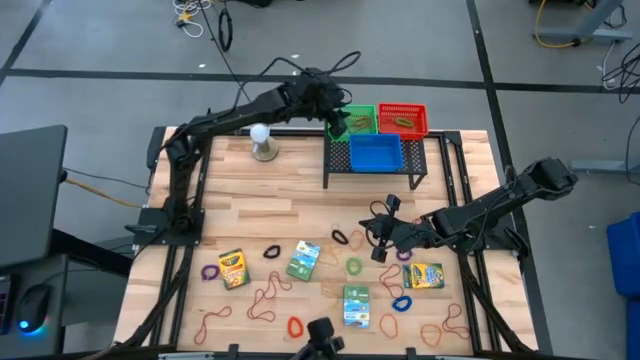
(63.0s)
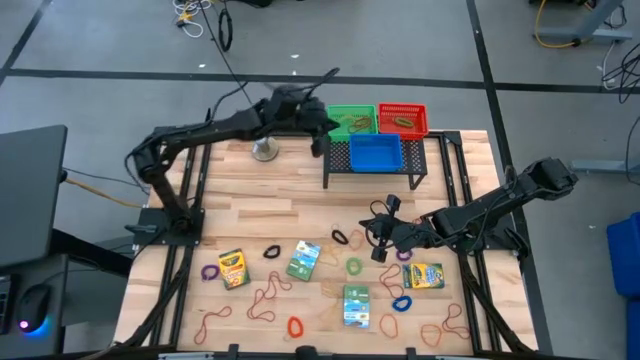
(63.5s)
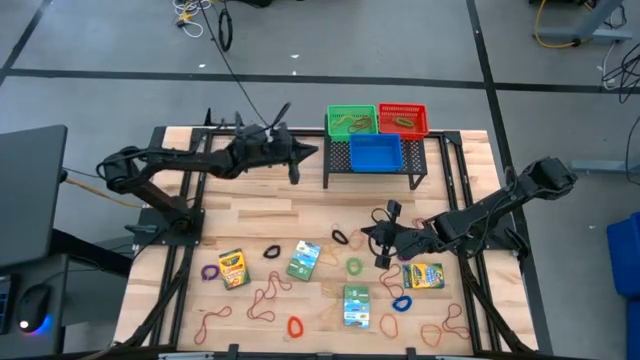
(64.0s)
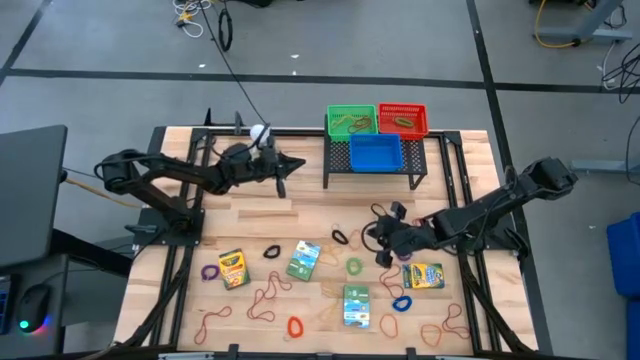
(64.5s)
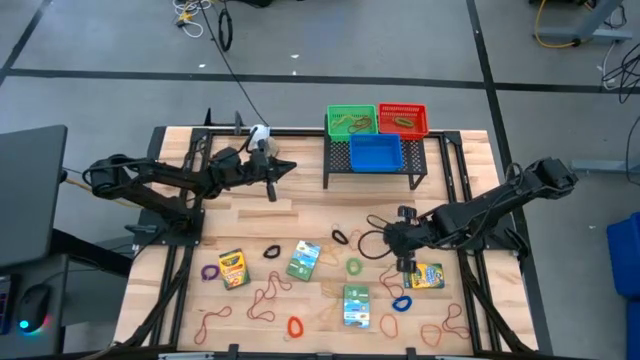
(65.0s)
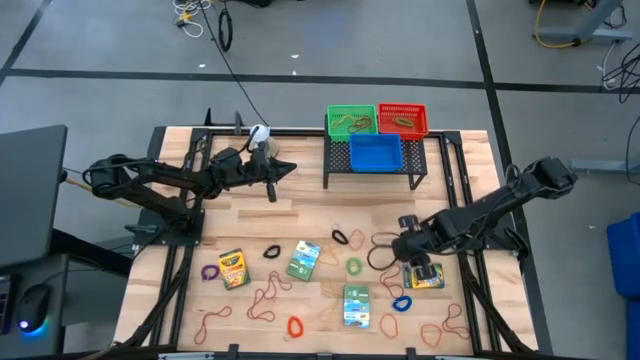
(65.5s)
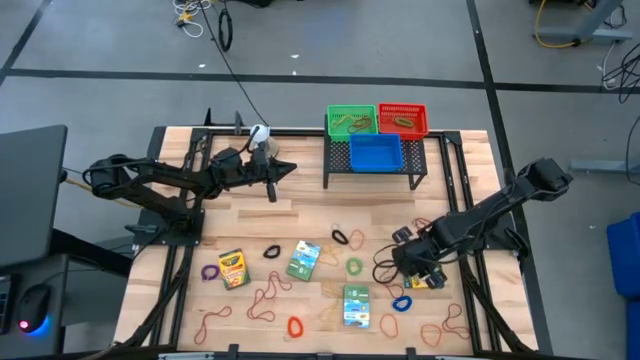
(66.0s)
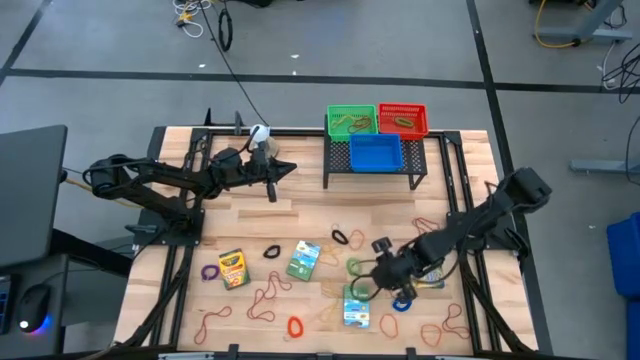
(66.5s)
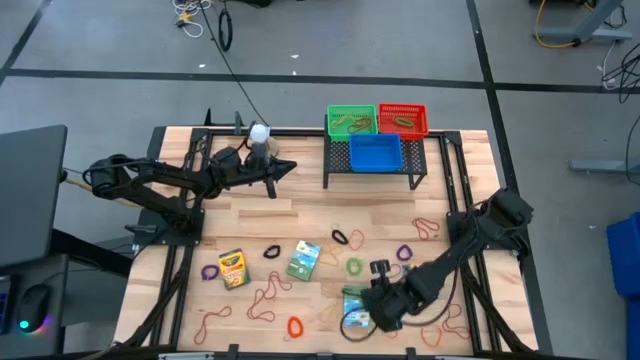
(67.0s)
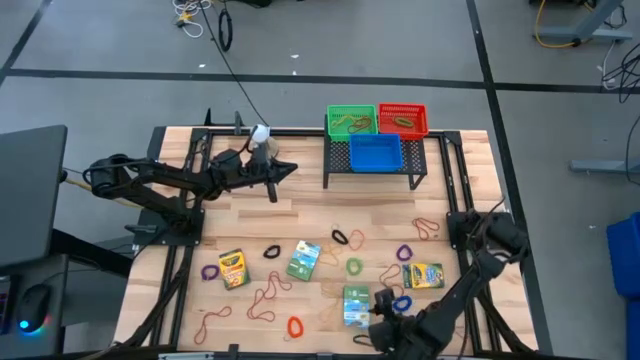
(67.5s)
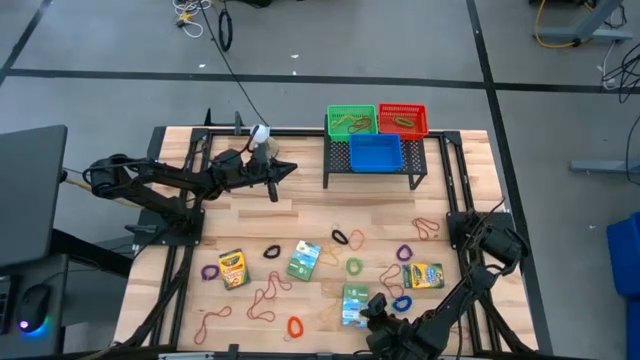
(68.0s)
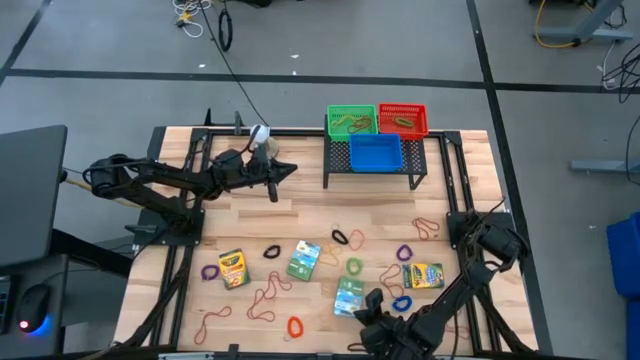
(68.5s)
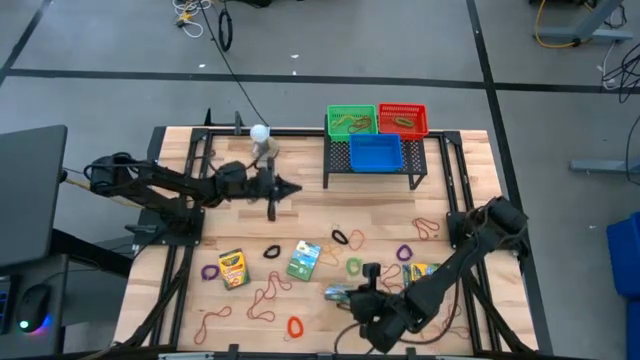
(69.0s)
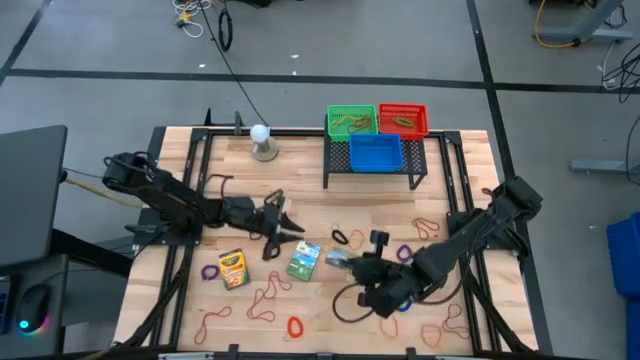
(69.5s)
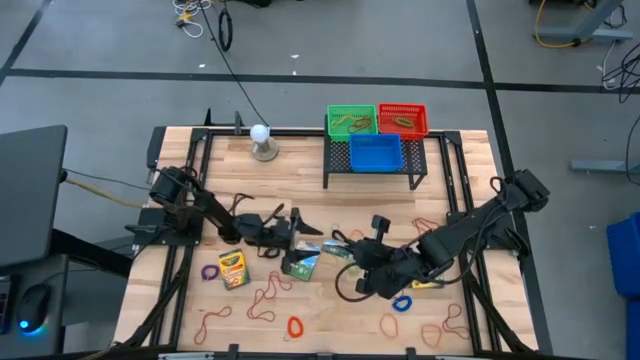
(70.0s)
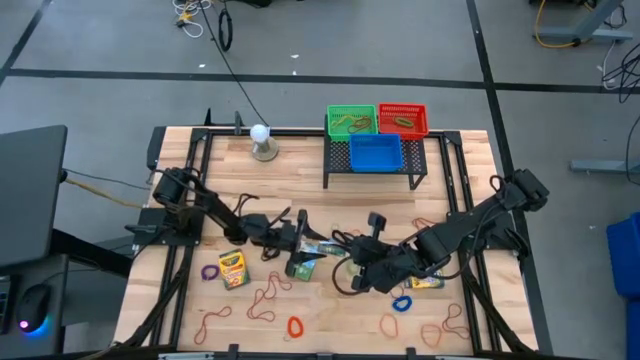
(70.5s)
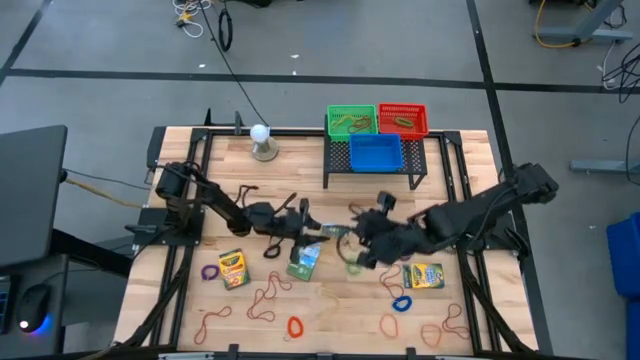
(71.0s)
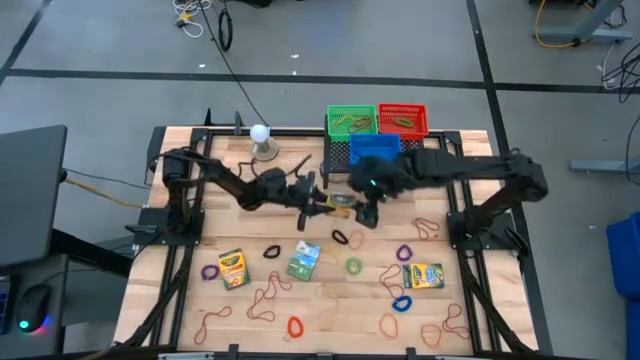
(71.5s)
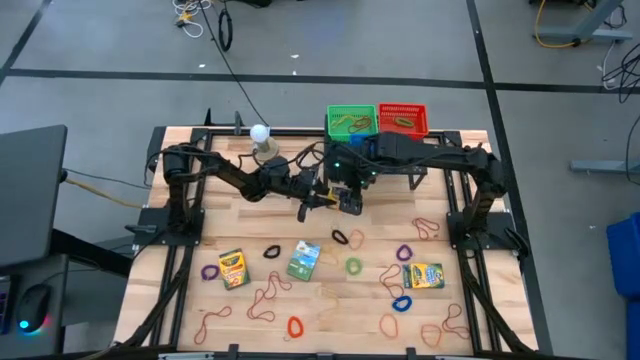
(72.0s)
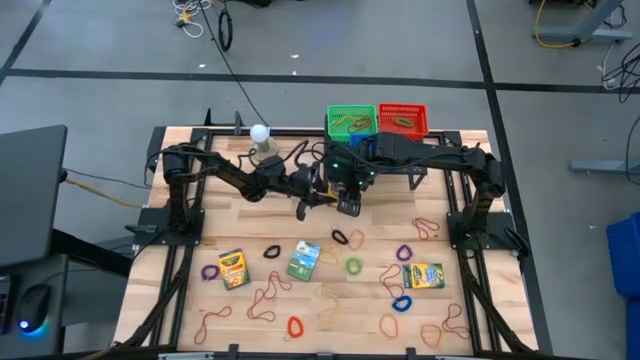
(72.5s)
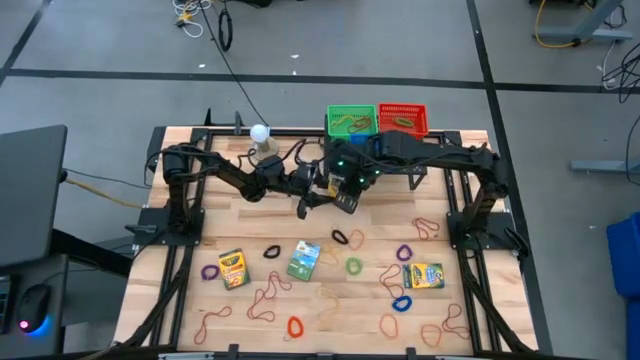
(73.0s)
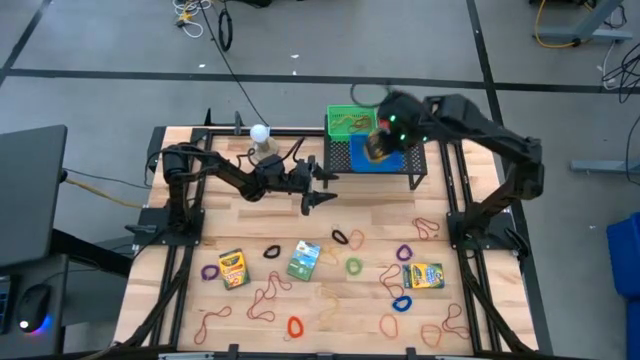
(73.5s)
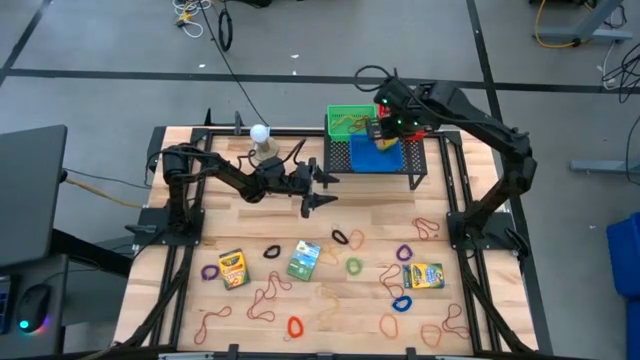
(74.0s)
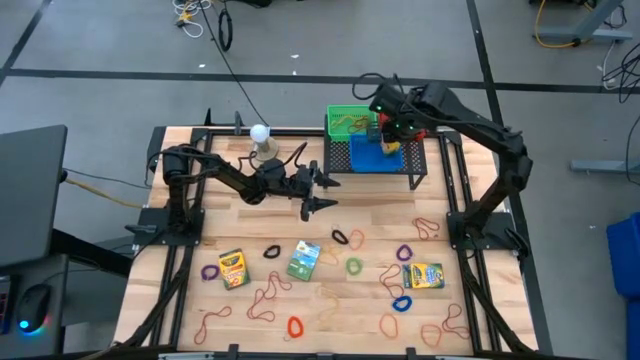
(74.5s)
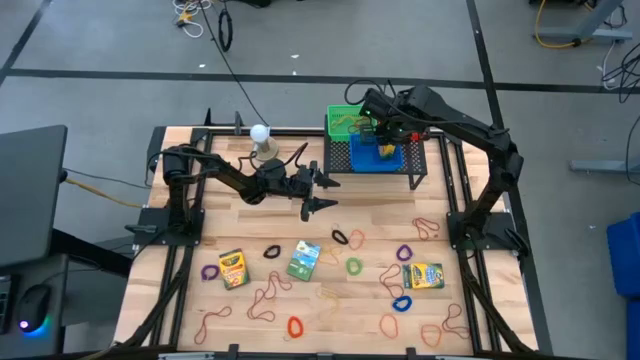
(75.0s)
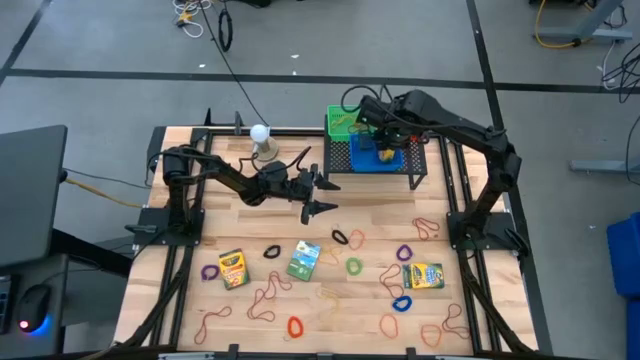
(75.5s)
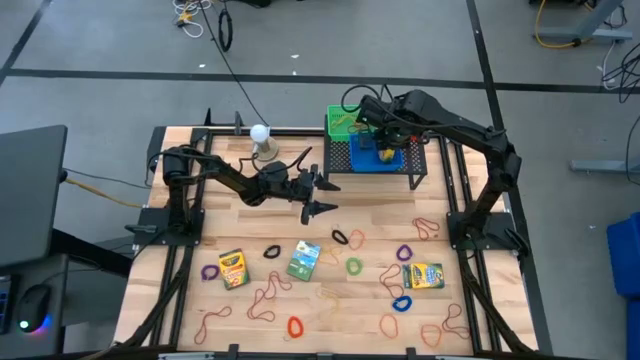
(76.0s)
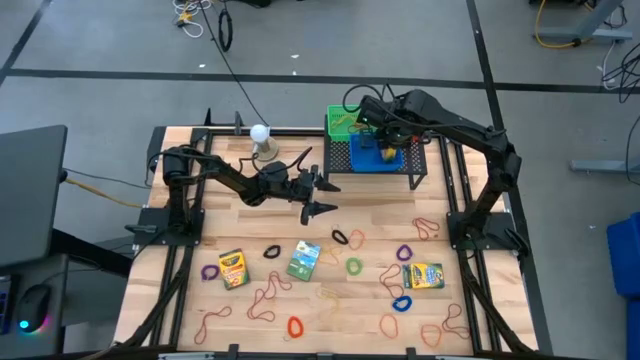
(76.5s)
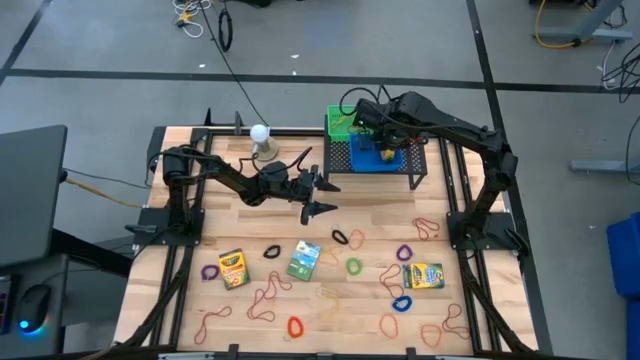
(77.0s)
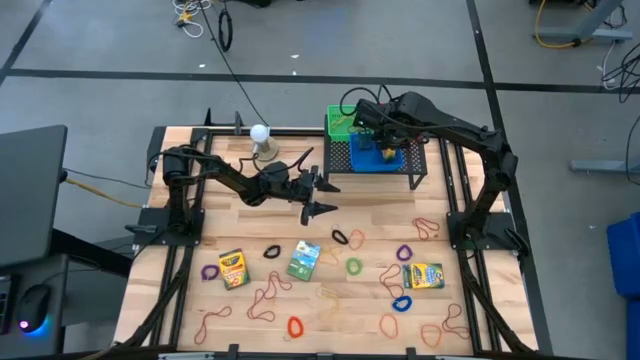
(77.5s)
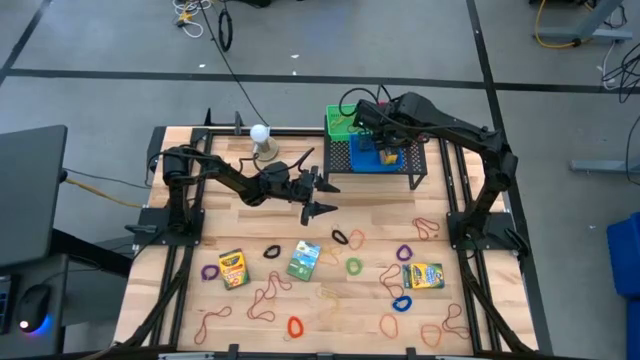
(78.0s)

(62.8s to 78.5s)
Task: Pick & Place Office Desk Supplies
Put the yellow crayon box into the blue bin

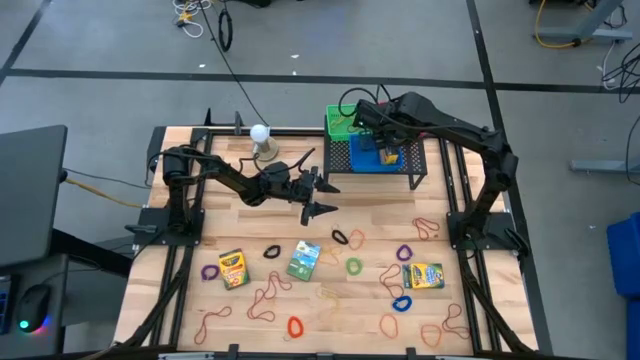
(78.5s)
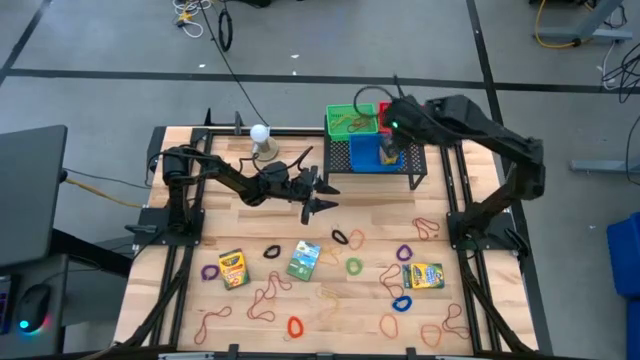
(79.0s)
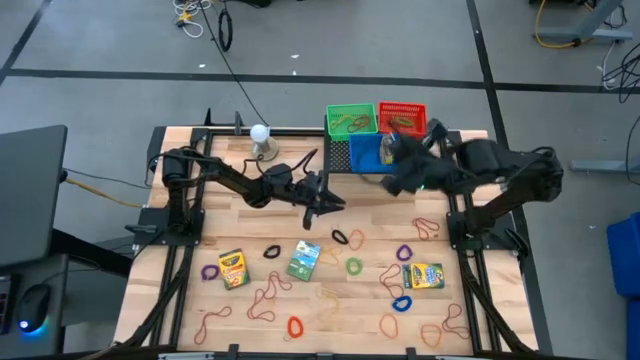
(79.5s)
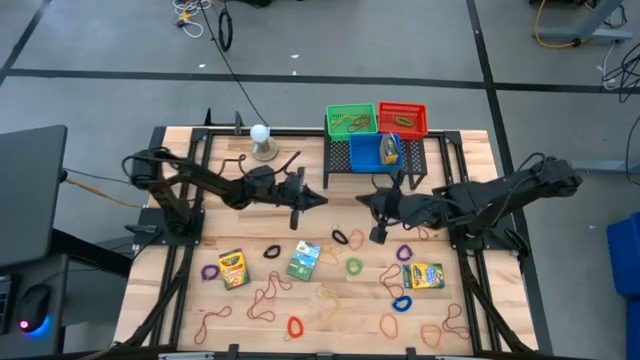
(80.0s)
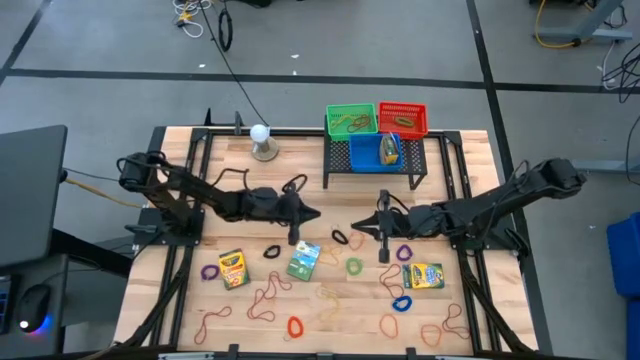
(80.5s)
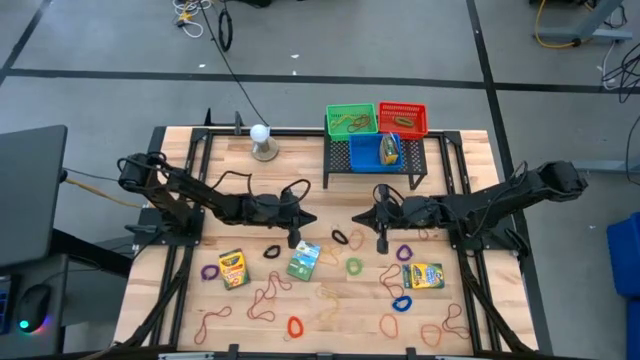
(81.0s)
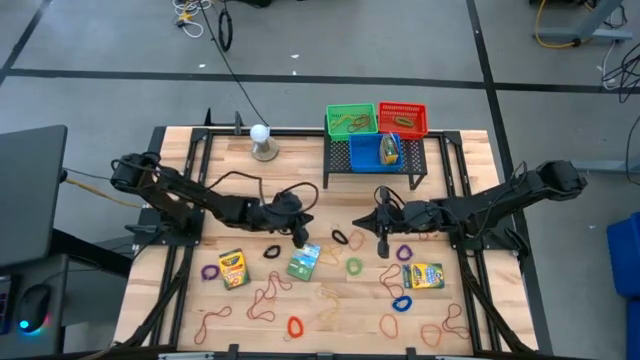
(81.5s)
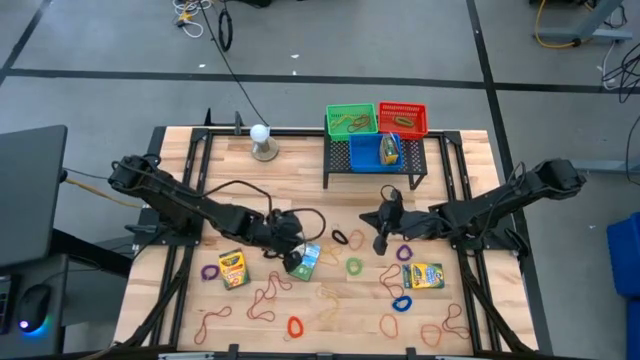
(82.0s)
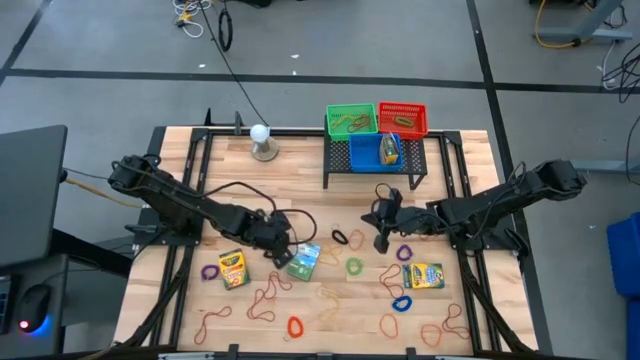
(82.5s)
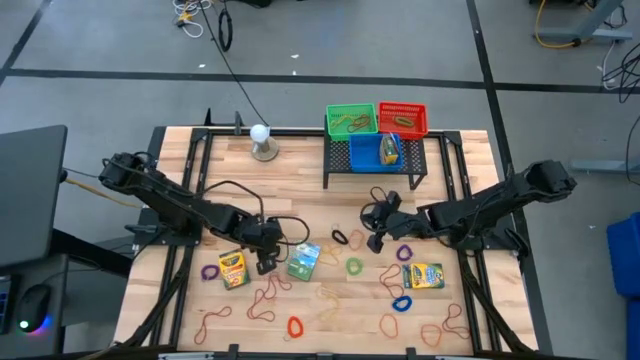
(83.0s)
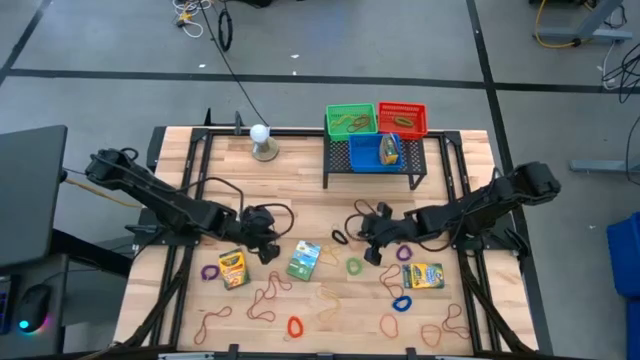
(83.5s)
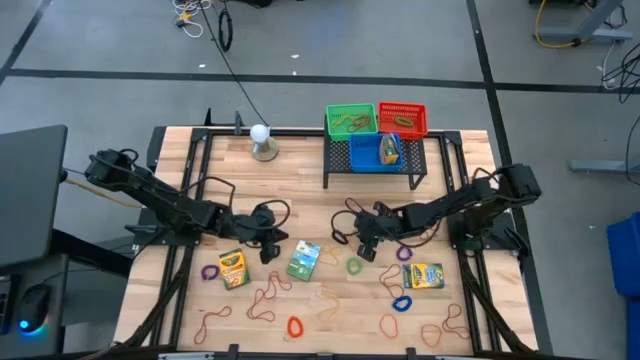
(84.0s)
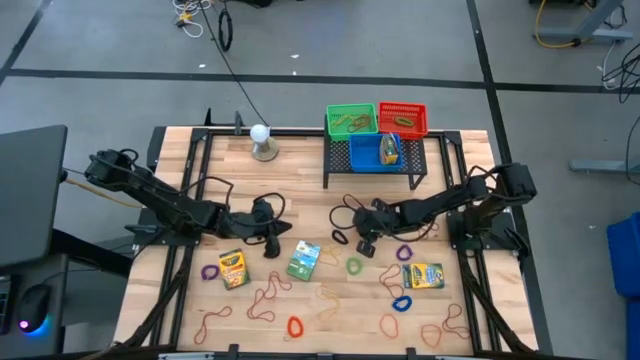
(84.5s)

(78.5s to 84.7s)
Put the orange rubber band into the green bin

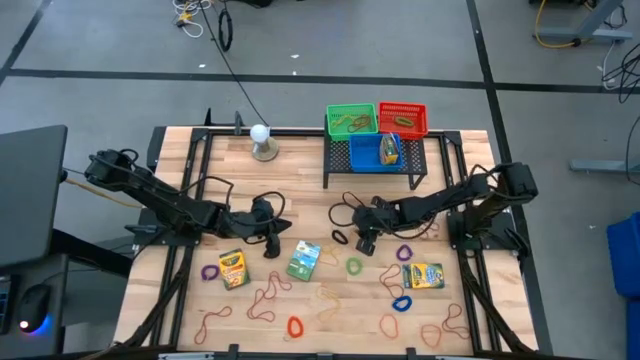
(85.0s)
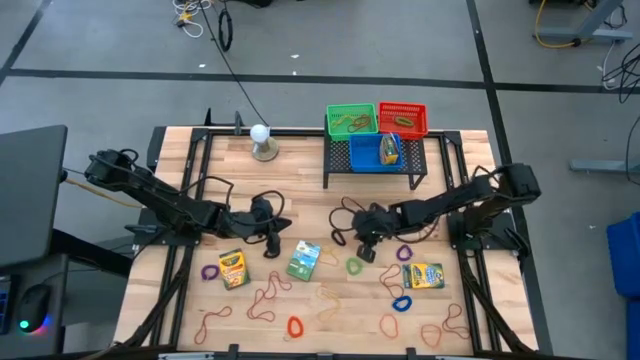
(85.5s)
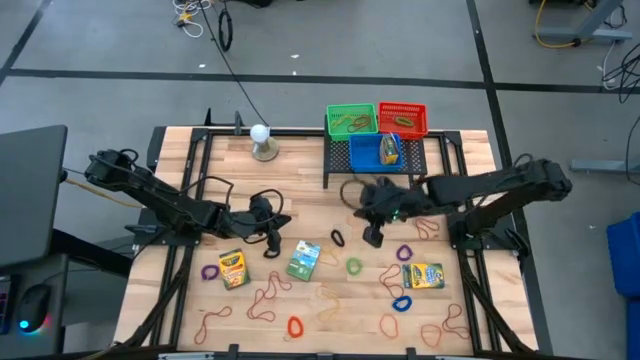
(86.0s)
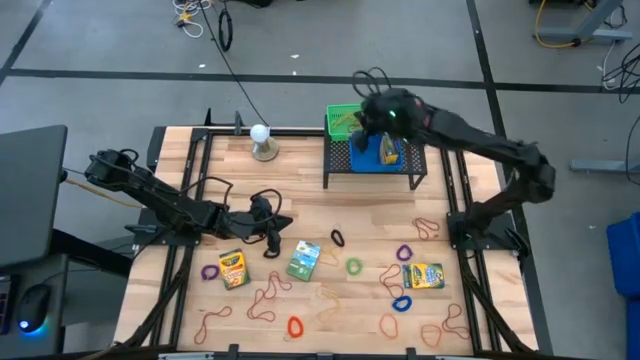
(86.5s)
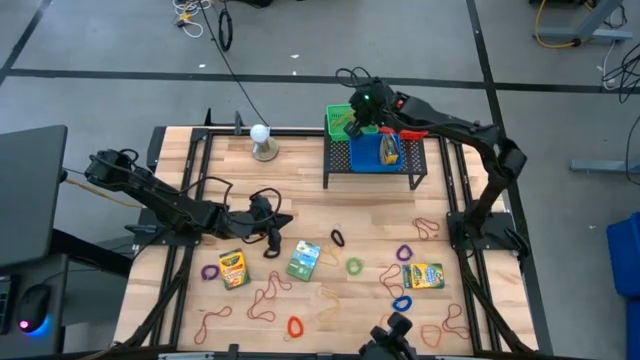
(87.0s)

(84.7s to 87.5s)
Put the orange rubber band into the green bin
